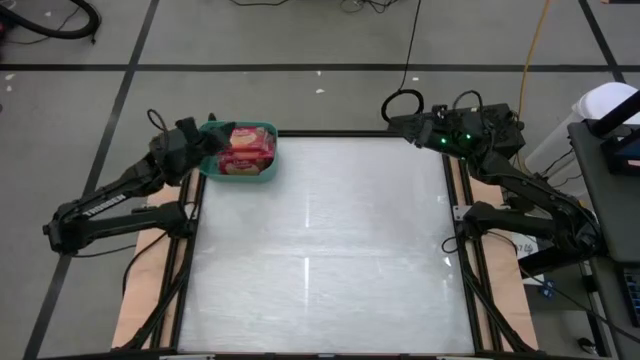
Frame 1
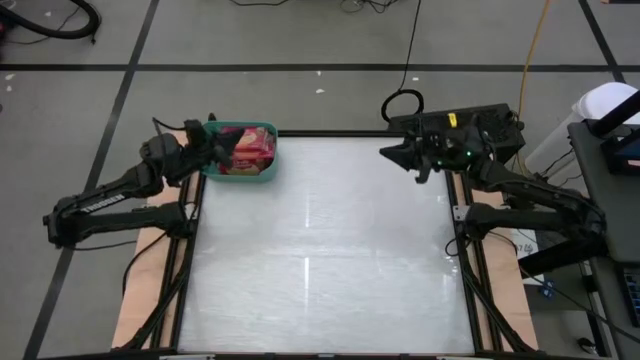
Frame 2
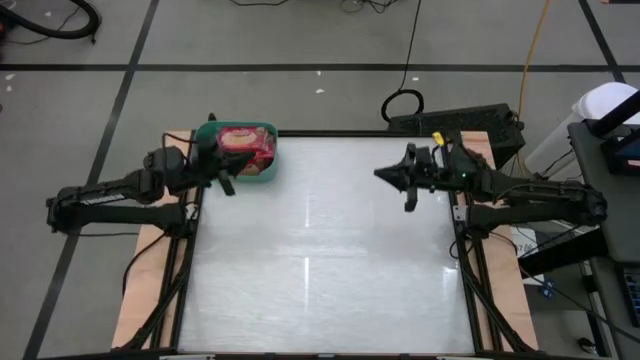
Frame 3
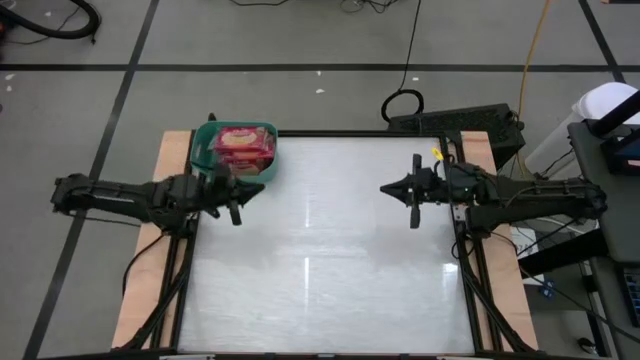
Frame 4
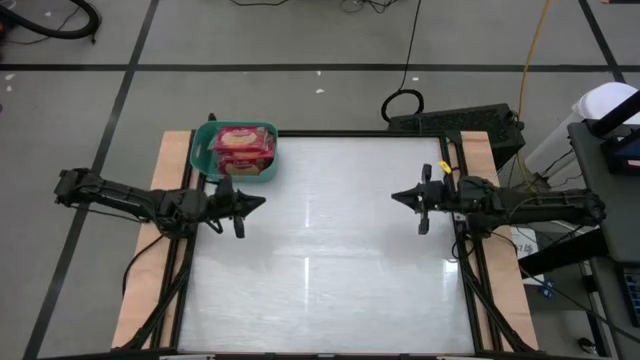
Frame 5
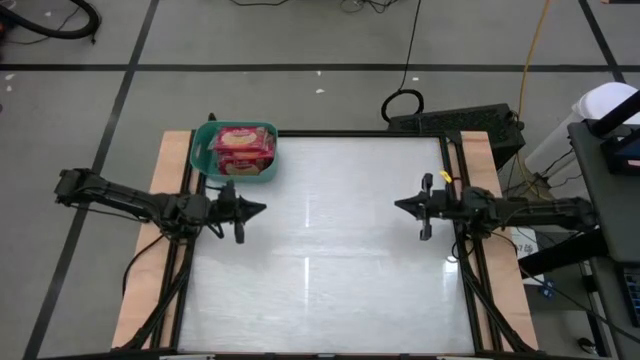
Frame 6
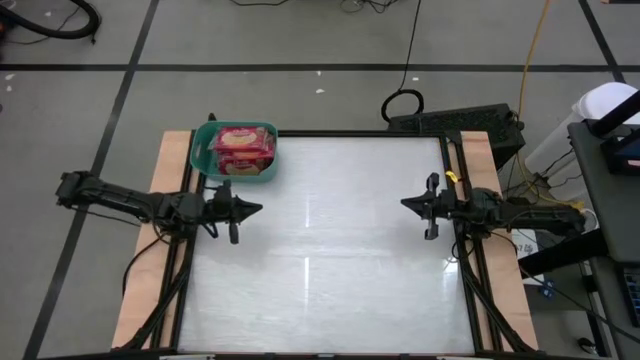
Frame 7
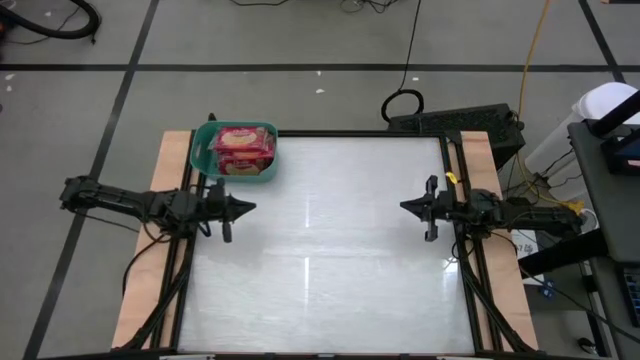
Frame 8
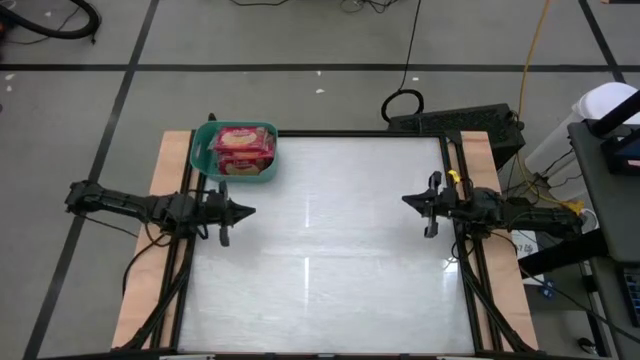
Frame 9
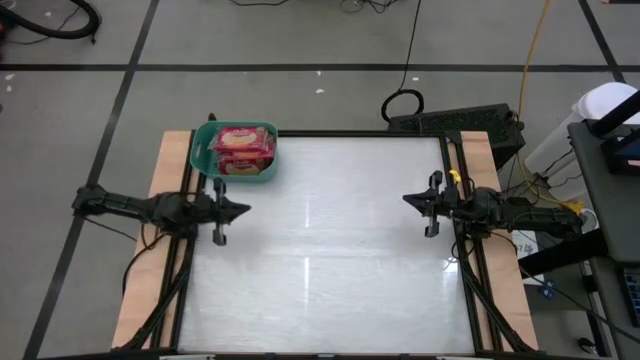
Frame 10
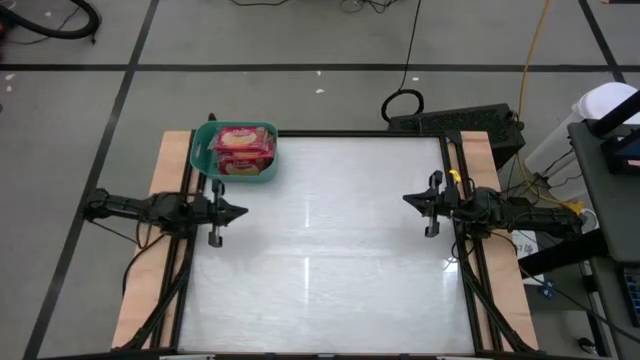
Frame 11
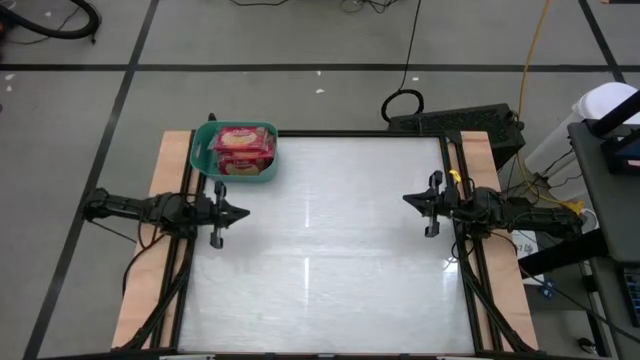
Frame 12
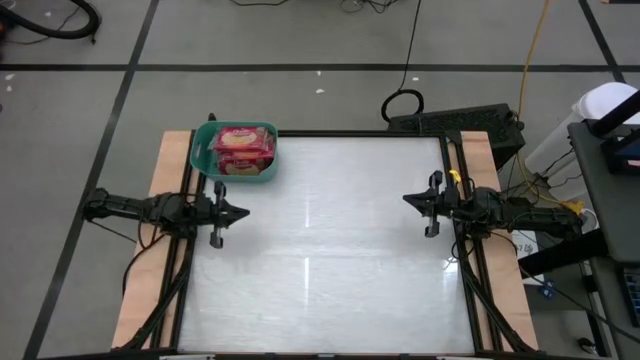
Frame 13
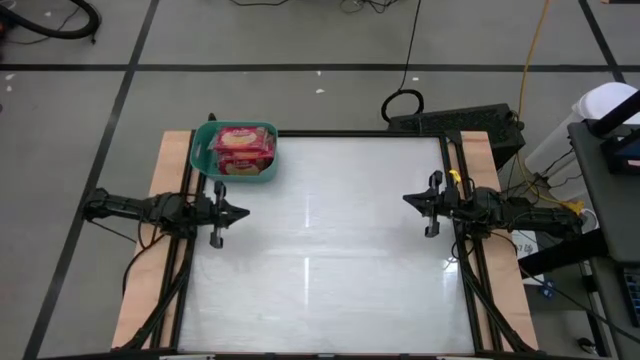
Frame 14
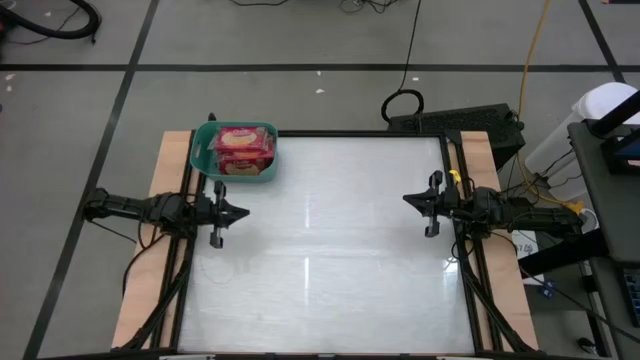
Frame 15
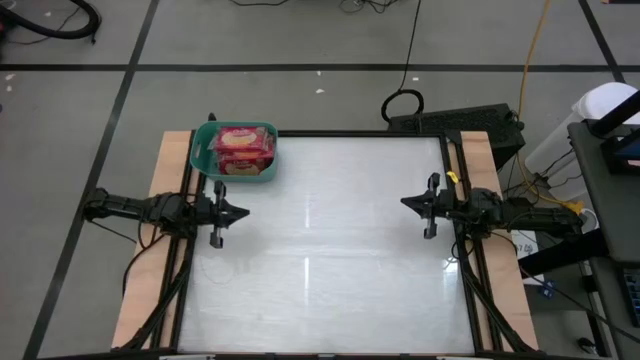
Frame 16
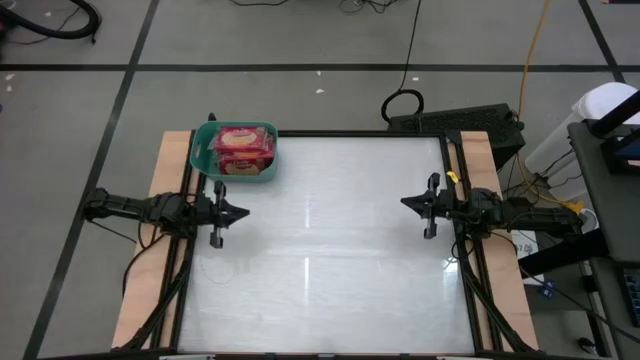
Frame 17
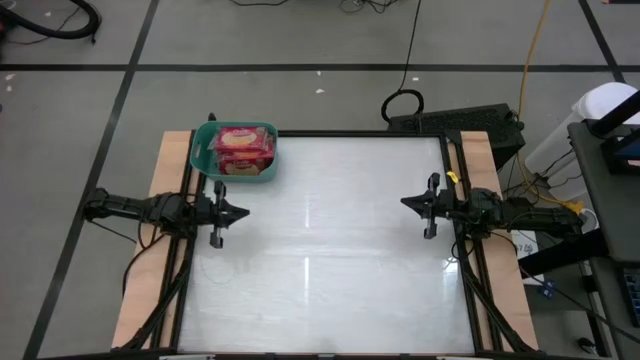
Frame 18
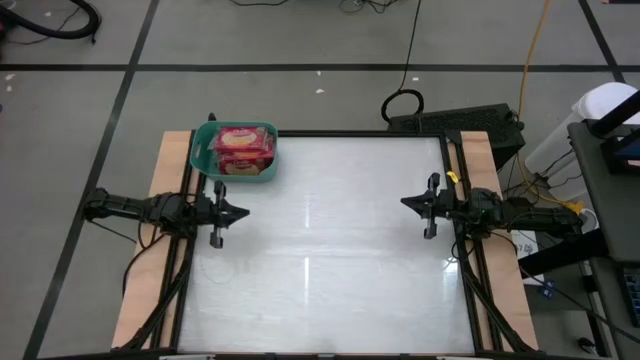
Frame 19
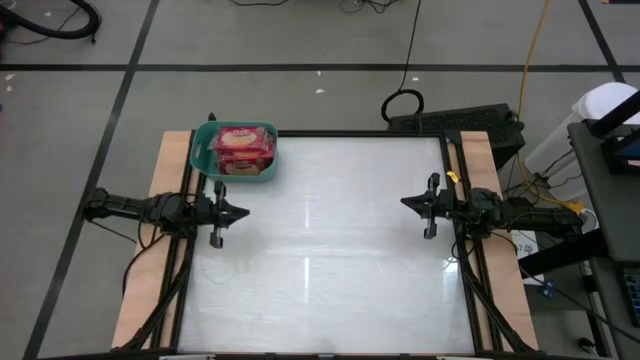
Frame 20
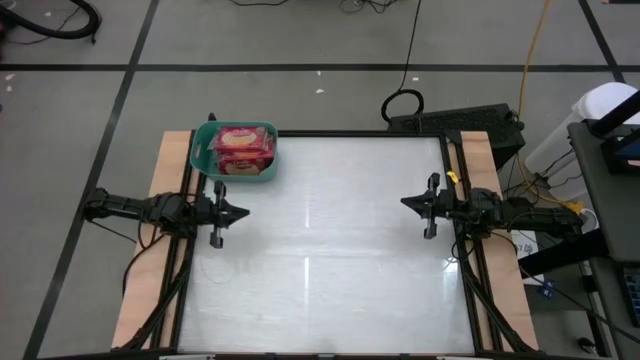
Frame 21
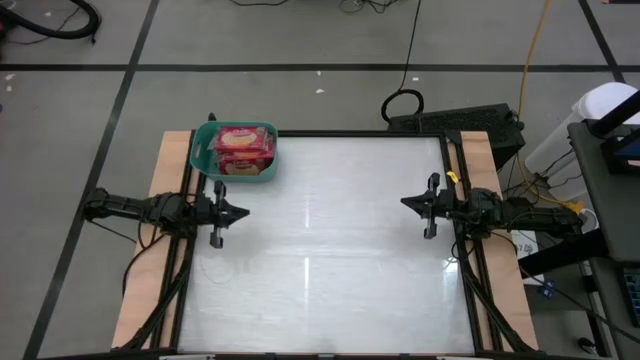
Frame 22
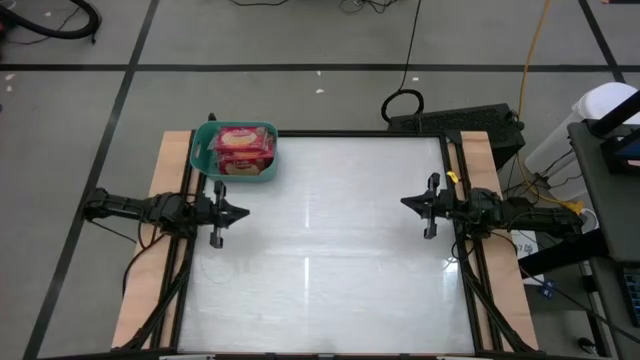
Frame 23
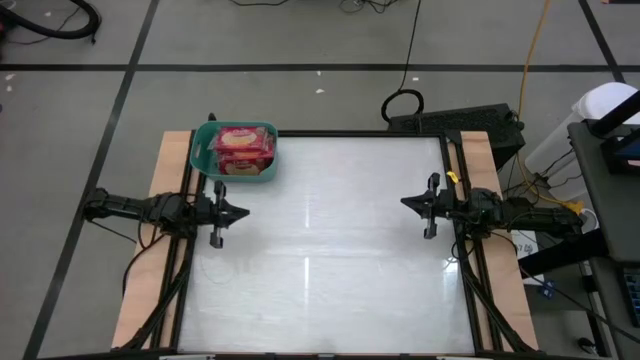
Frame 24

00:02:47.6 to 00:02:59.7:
Task: Sort popcorn bags into baskets
Return to Home Position

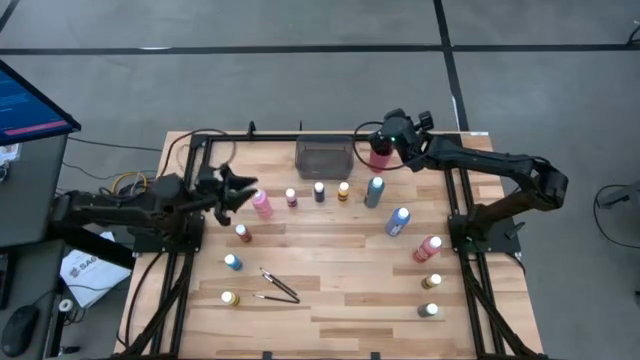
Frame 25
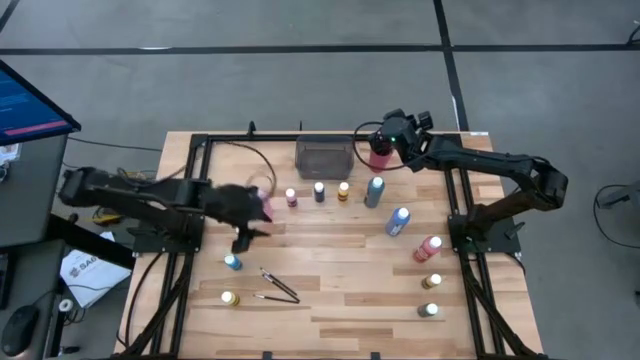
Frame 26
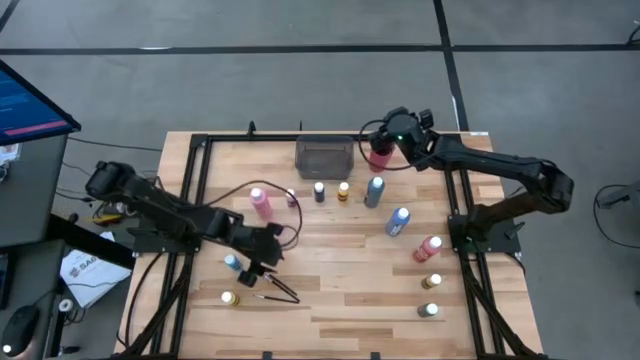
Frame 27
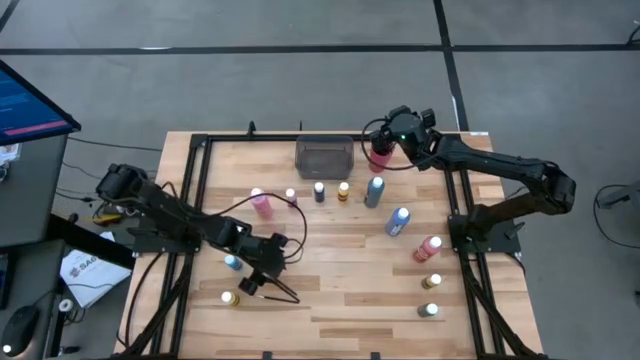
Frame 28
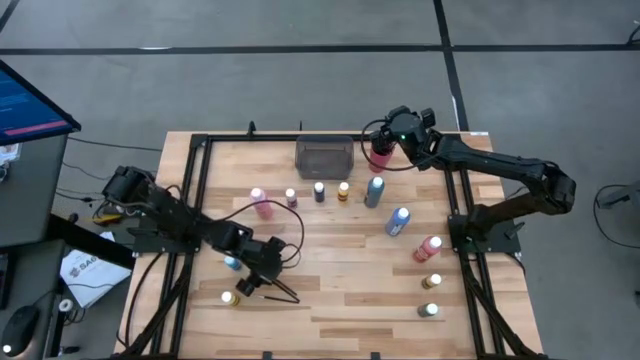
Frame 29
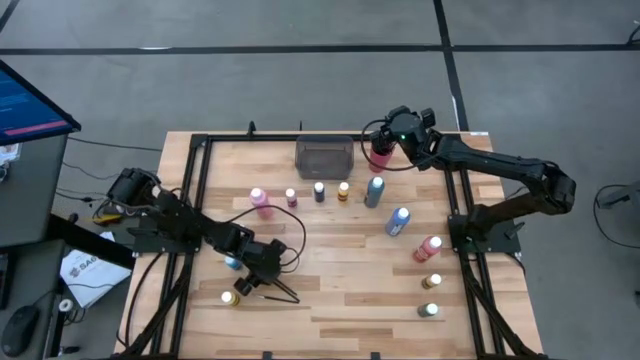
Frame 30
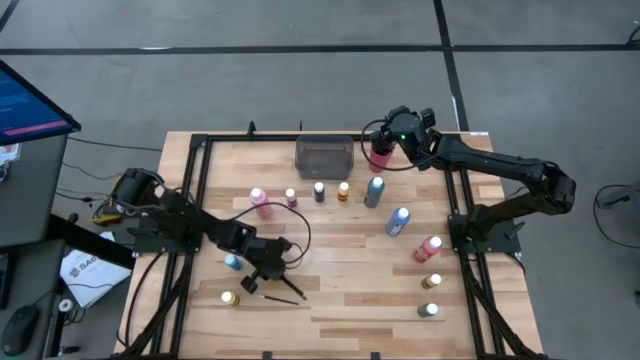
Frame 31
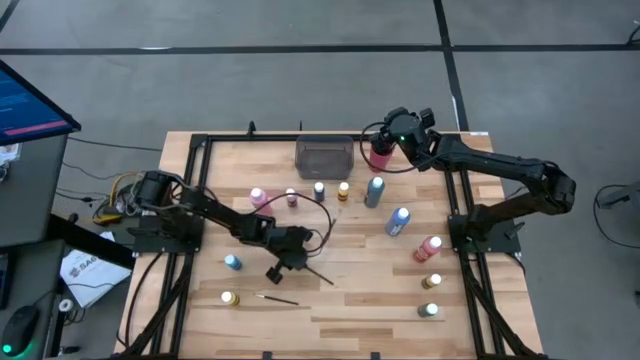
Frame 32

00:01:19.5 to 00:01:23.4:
Task: Pick & Place Paint Supplies
Put the black paintbrush into the red cup

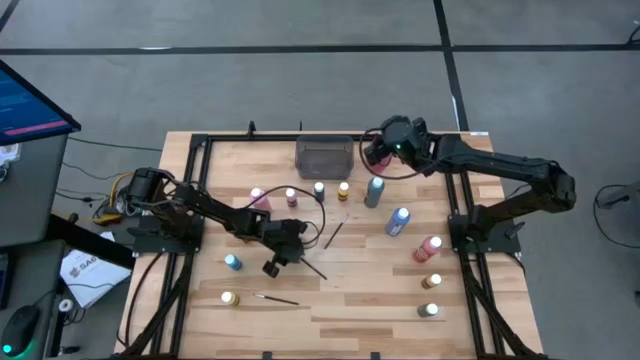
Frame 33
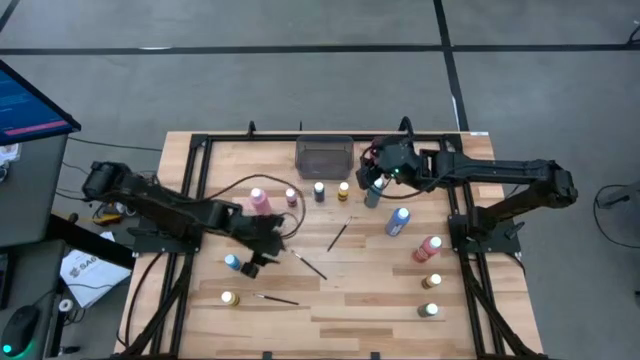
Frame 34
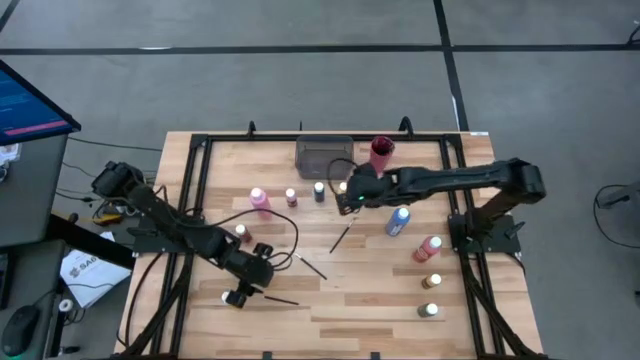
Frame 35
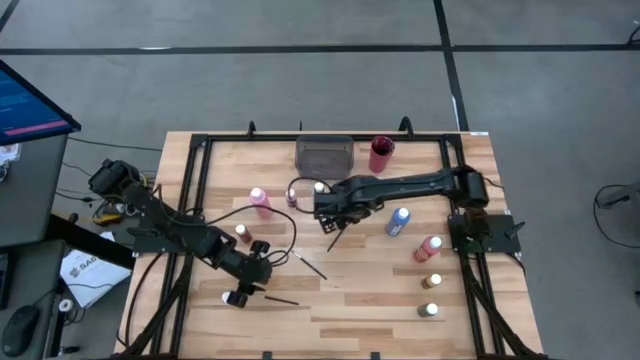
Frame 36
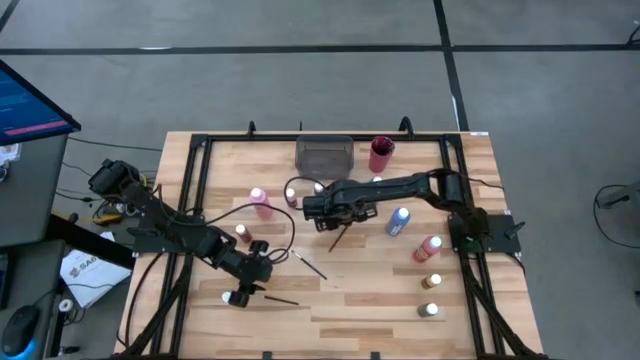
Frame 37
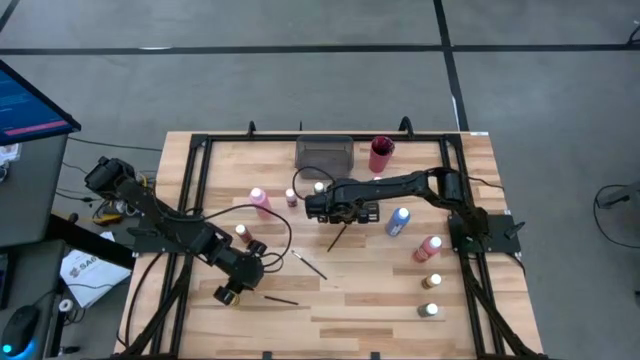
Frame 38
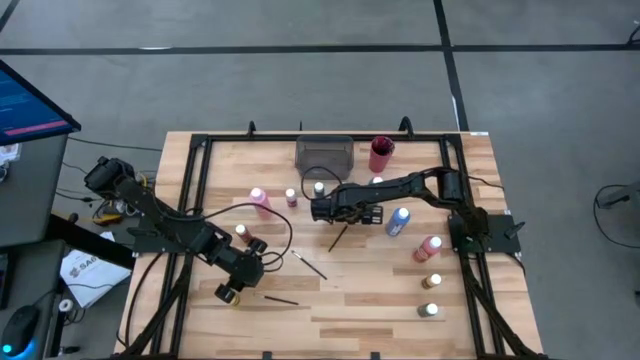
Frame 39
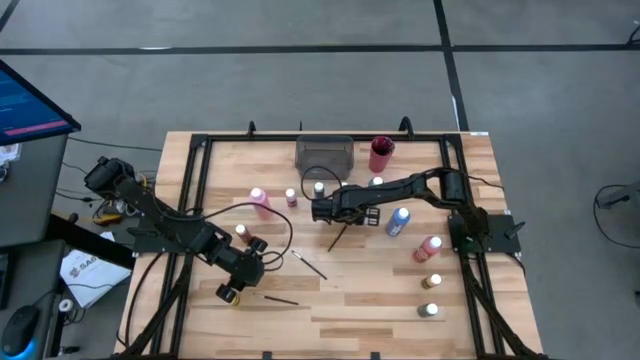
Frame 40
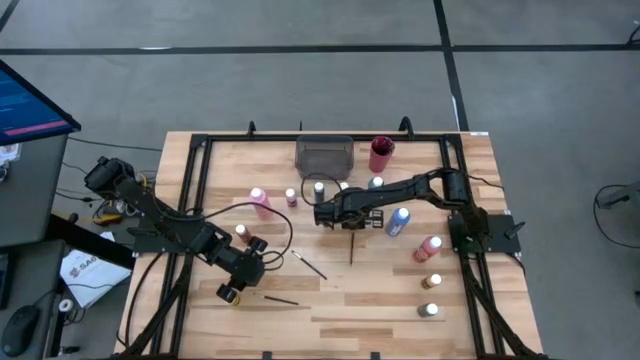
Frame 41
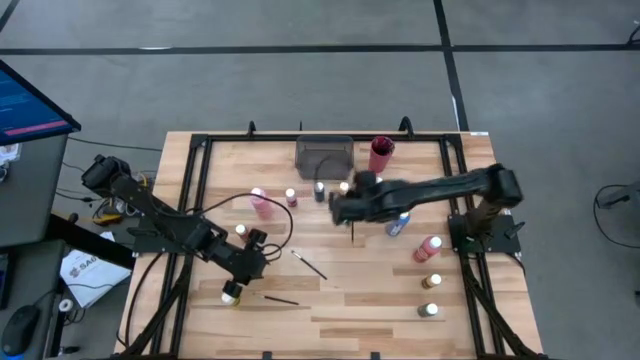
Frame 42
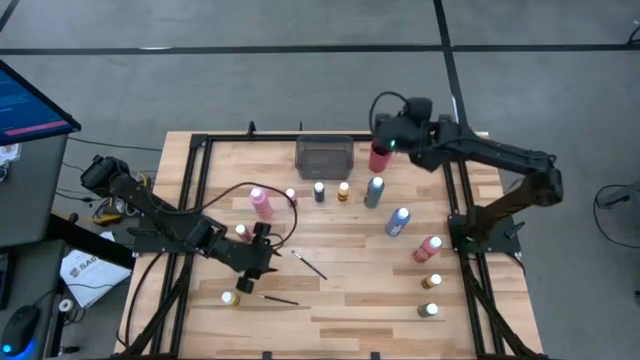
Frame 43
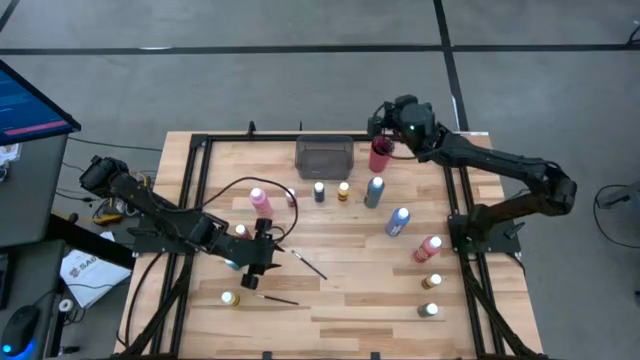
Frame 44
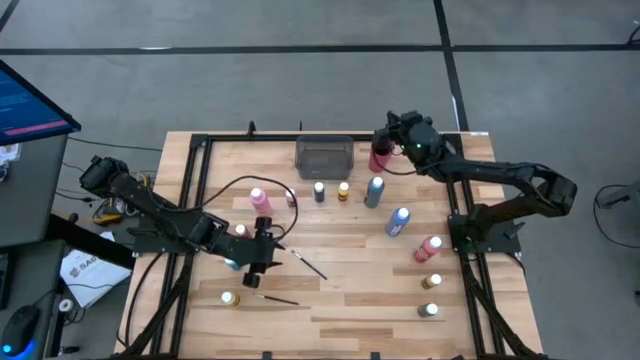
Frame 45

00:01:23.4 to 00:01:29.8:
Put the black paintbrush into the red cup
